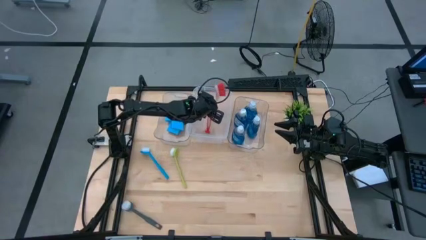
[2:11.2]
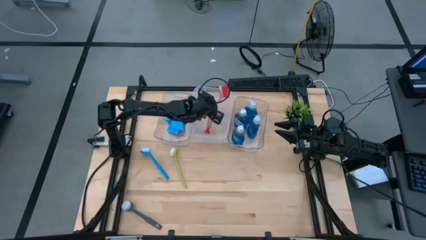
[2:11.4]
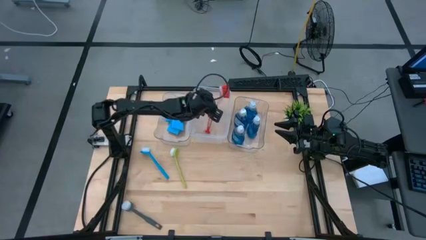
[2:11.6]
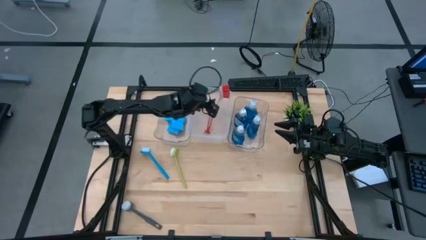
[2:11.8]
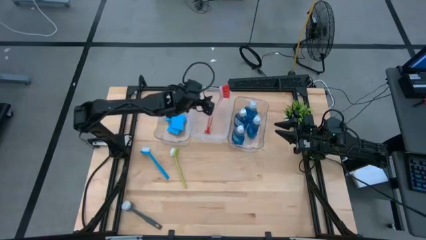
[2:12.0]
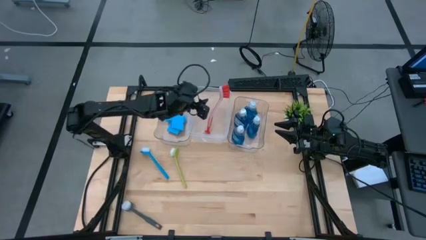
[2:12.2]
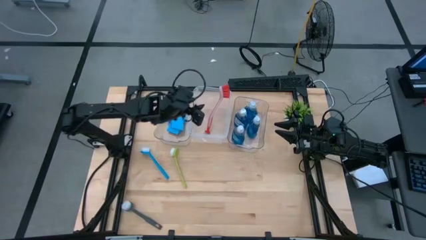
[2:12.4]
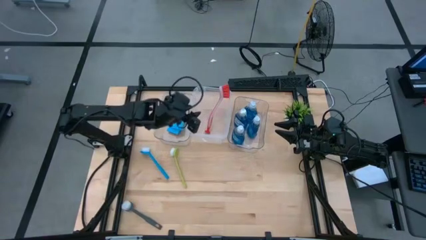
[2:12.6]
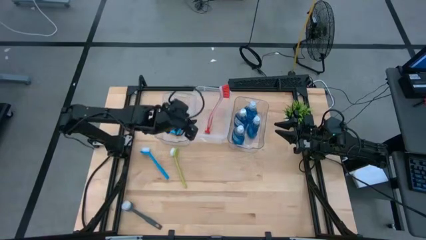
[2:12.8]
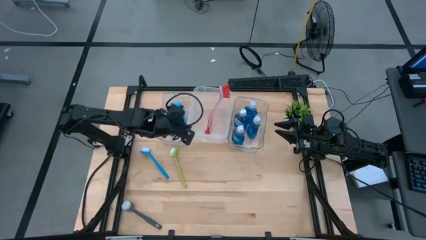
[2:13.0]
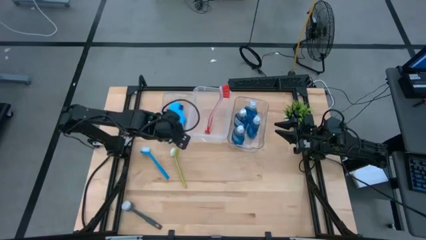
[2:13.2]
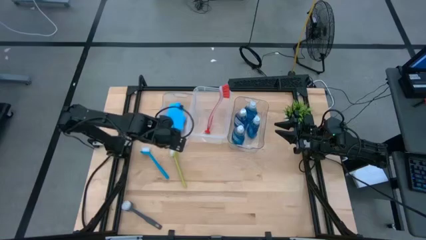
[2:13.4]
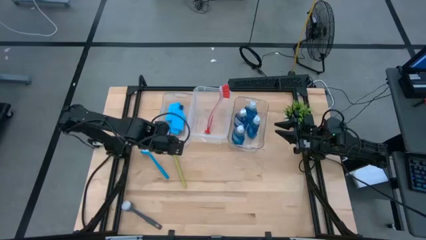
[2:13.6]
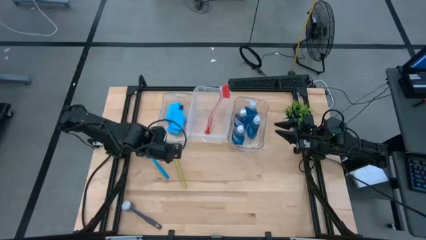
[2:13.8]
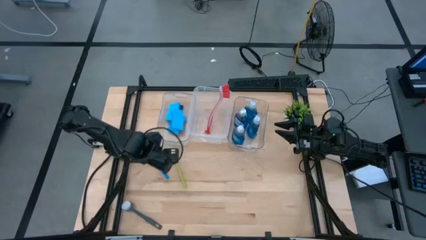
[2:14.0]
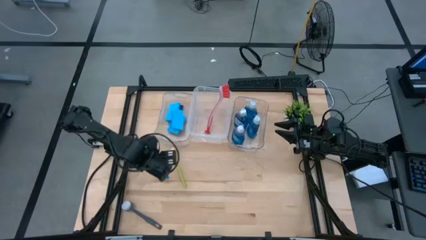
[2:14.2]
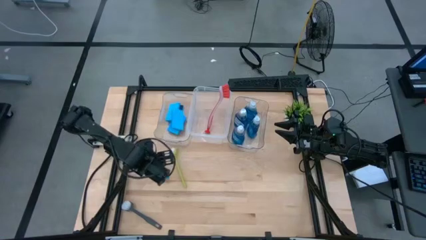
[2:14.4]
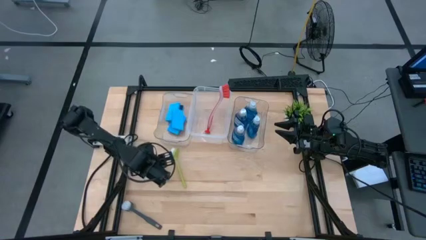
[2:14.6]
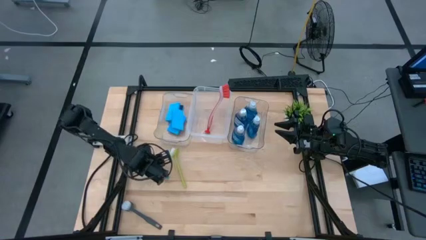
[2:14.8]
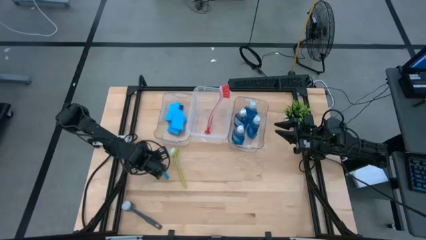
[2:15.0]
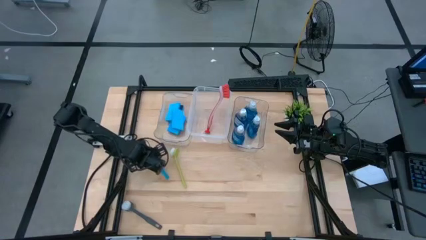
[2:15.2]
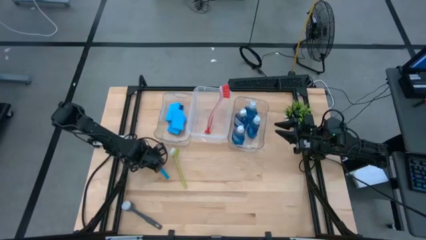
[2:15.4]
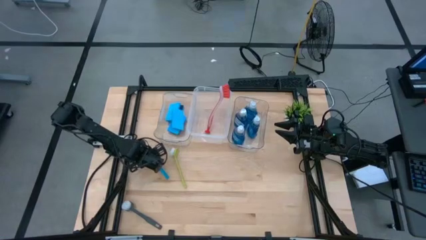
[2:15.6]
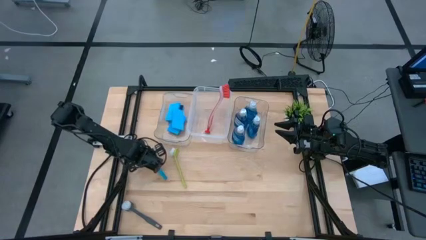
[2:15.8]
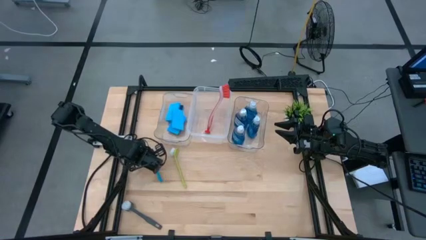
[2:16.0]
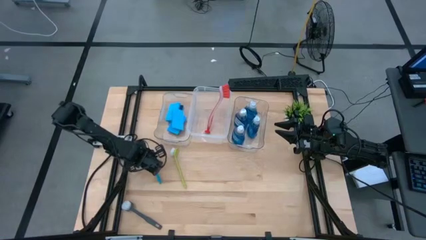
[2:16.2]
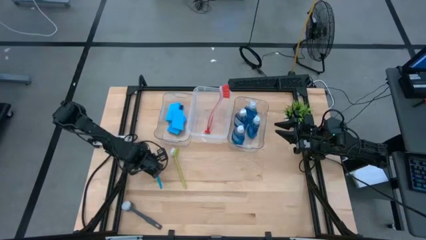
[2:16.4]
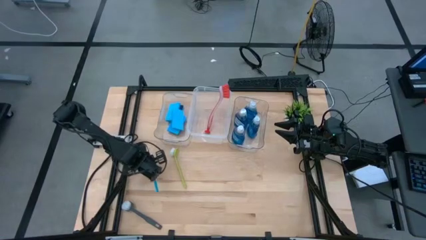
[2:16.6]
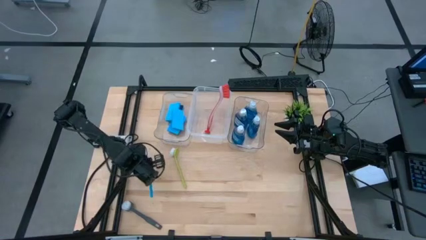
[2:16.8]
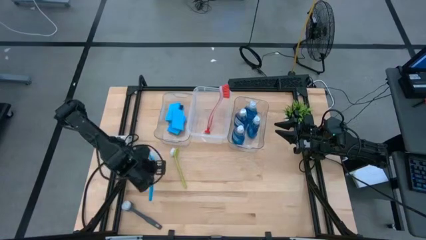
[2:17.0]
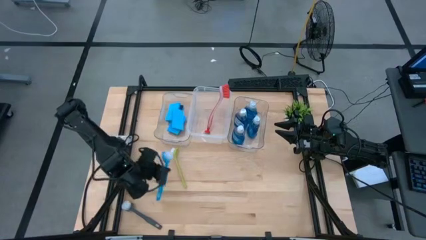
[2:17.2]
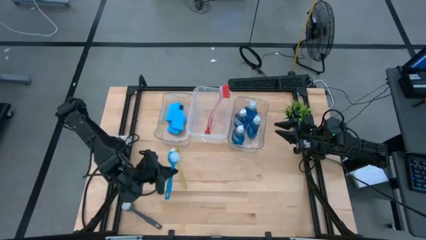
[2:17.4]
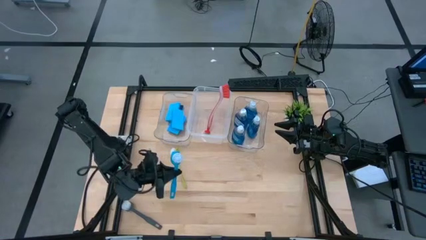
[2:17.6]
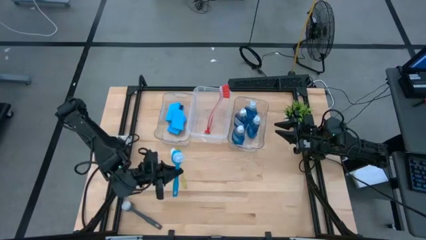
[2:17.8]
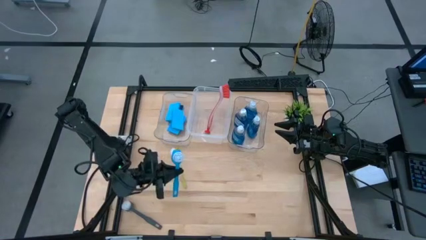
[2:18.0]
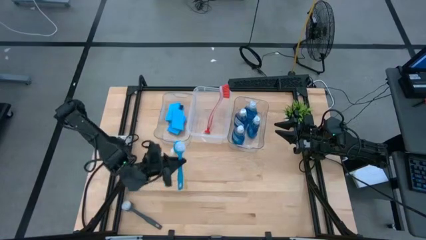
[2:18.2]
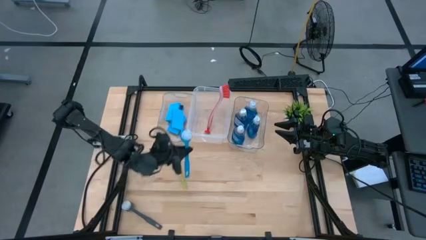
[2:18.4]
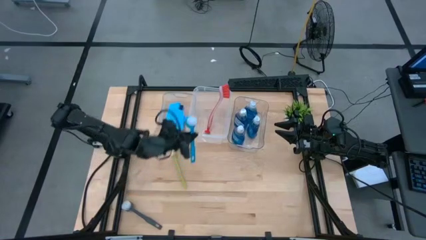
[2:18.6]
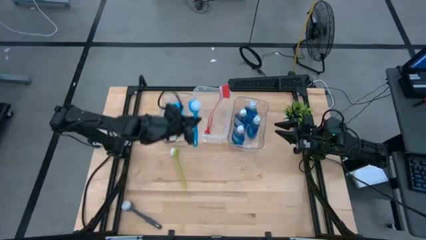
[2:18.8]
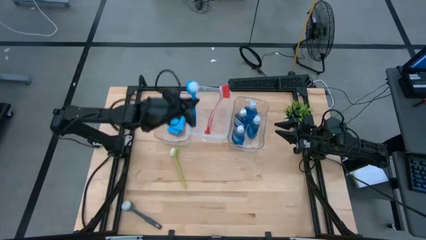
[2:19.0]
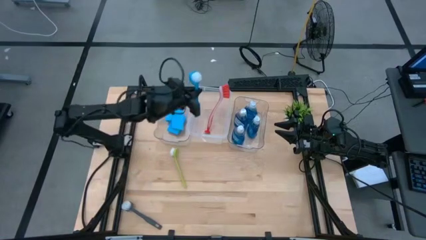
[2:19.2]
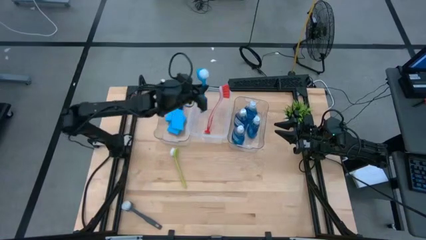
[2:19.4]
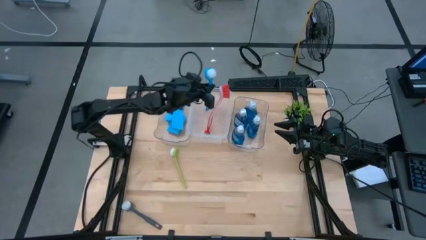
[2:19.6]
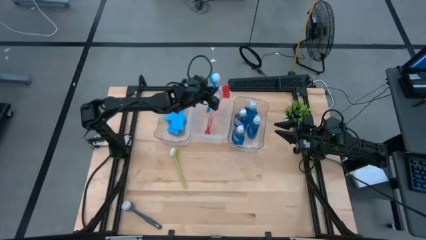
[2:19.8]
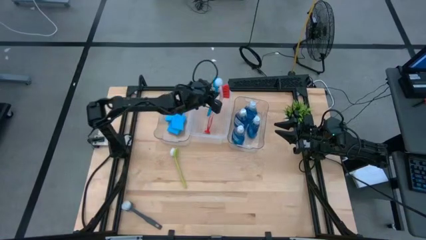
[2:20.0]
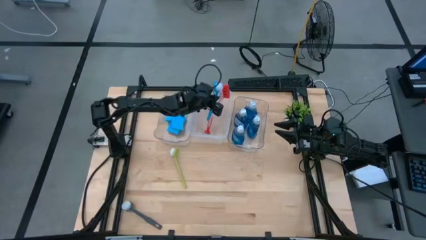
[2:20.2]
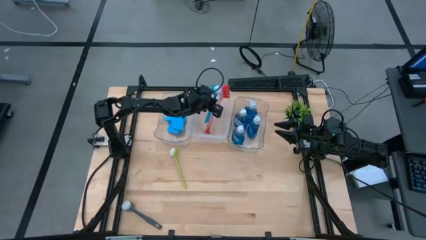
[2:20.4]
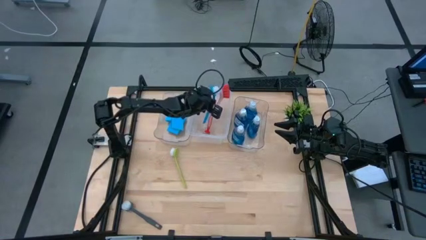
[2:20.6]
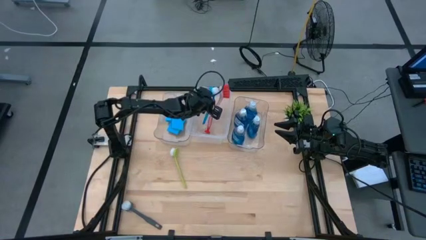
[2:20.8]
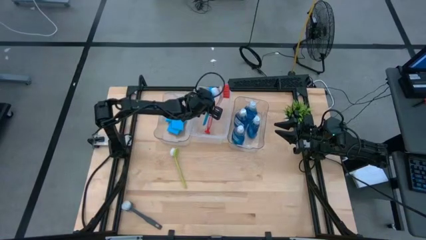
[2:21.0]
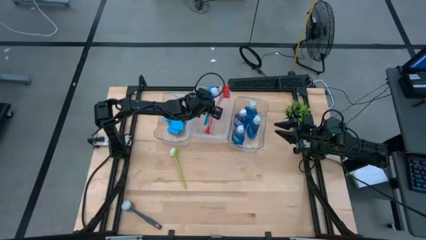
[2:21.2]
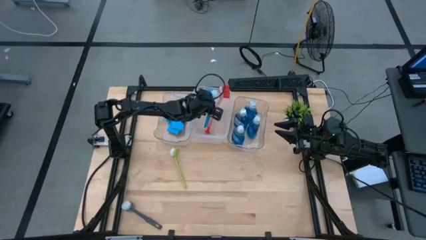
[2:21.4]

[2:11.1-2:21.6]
Task: Pick & Place Kitchen Sink Supplies
Put the blue dish brush into the middle transparent bin
